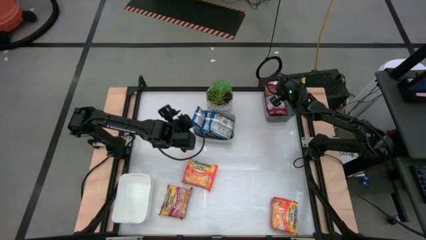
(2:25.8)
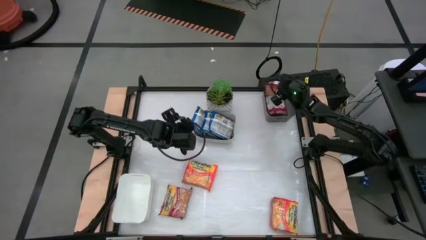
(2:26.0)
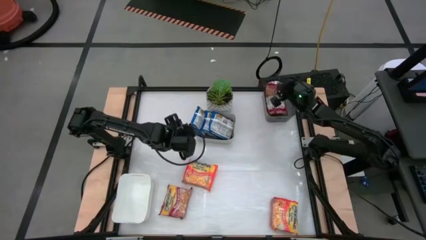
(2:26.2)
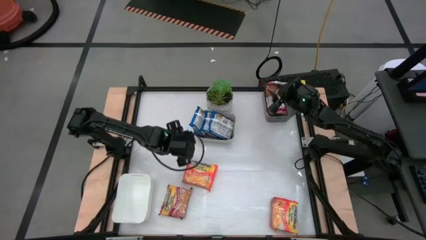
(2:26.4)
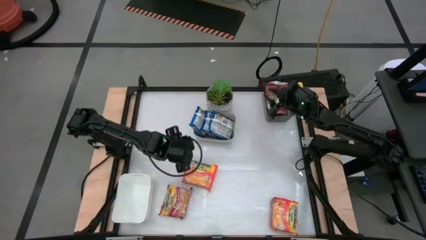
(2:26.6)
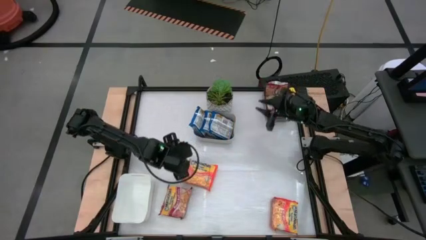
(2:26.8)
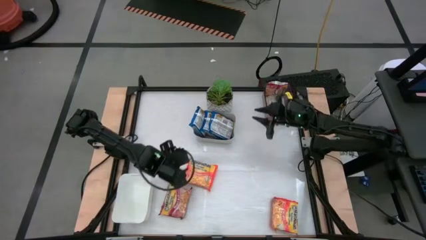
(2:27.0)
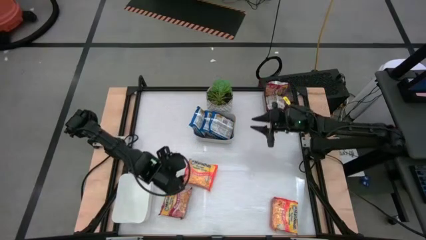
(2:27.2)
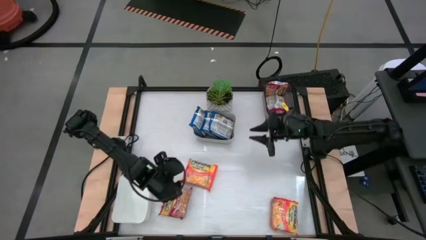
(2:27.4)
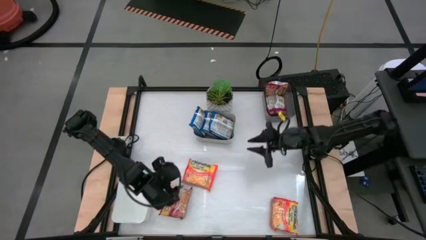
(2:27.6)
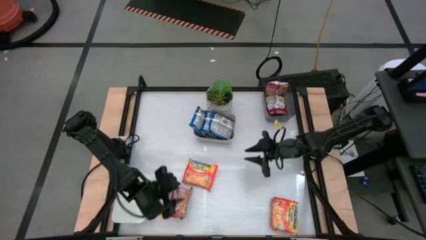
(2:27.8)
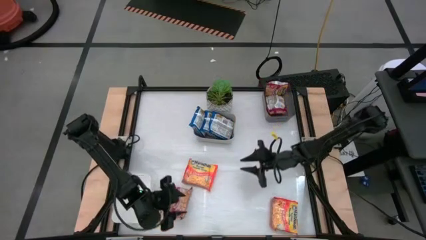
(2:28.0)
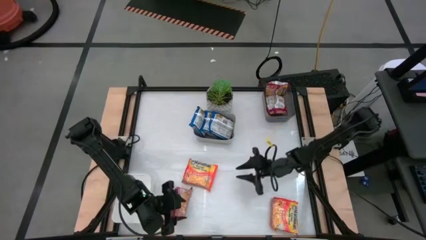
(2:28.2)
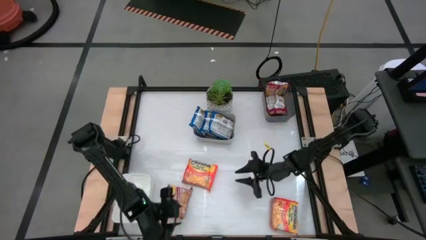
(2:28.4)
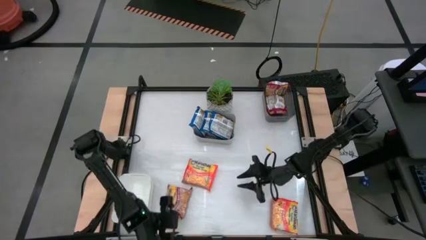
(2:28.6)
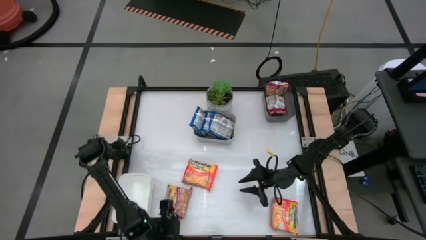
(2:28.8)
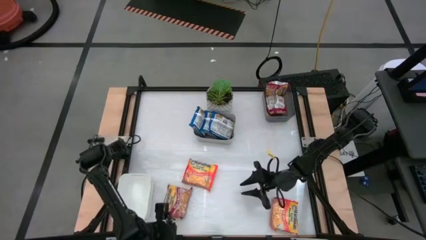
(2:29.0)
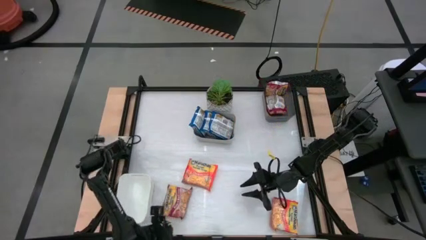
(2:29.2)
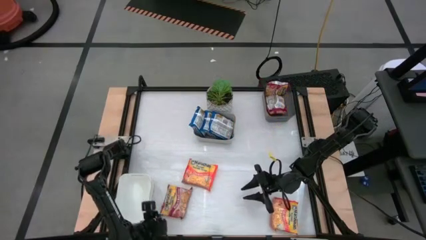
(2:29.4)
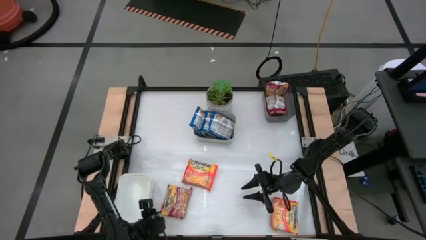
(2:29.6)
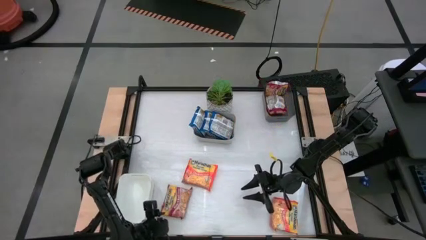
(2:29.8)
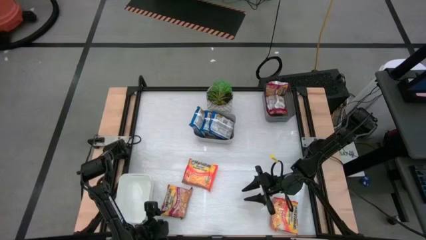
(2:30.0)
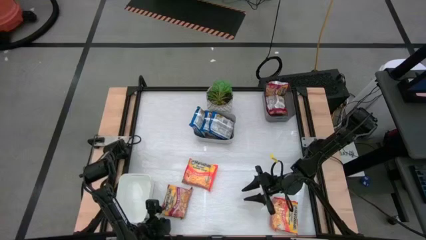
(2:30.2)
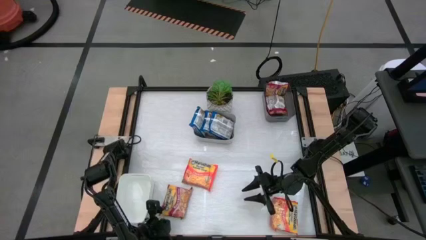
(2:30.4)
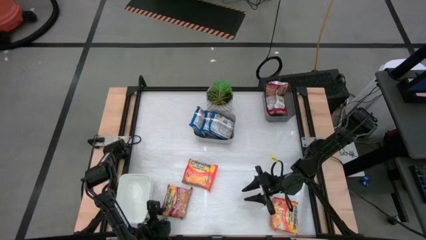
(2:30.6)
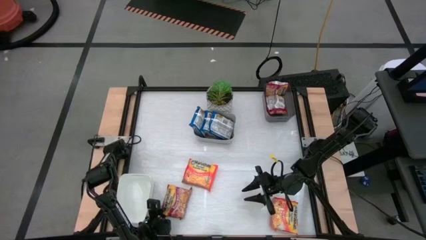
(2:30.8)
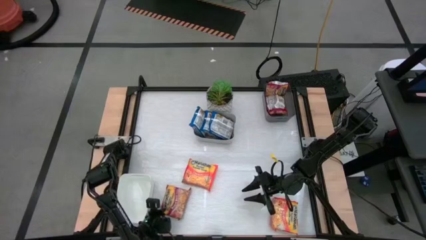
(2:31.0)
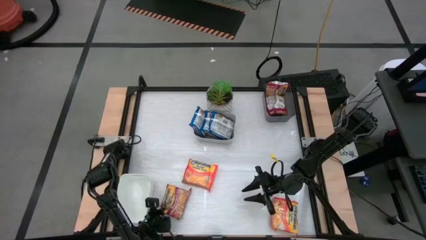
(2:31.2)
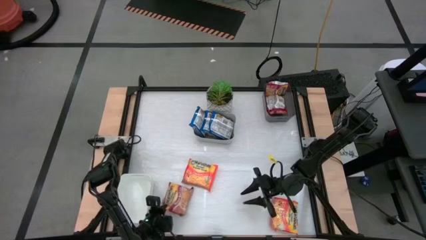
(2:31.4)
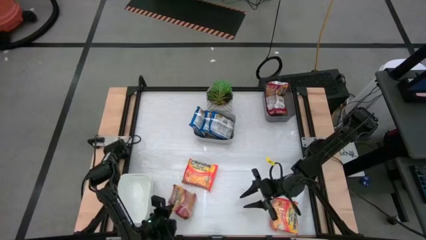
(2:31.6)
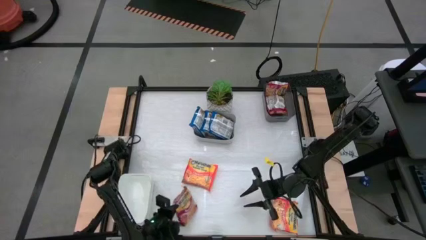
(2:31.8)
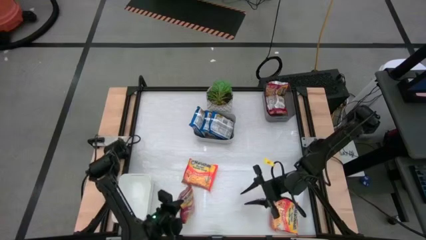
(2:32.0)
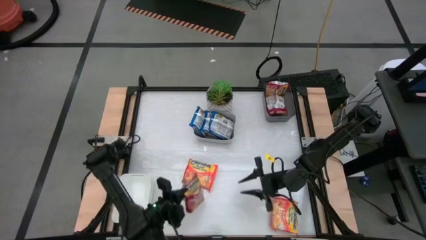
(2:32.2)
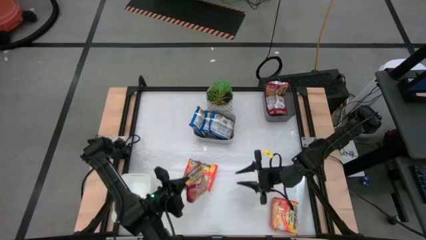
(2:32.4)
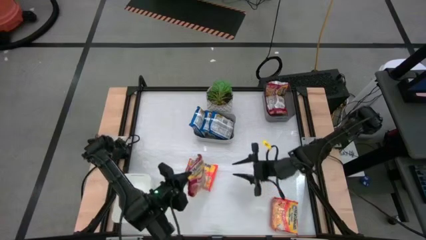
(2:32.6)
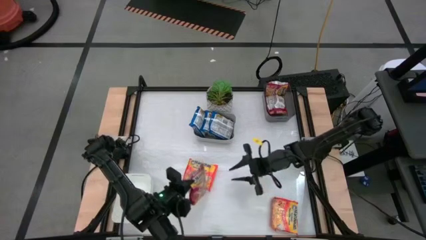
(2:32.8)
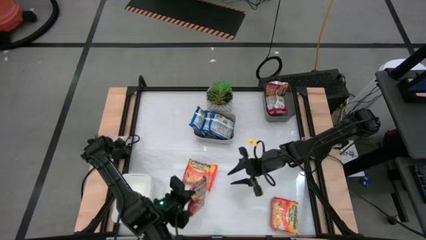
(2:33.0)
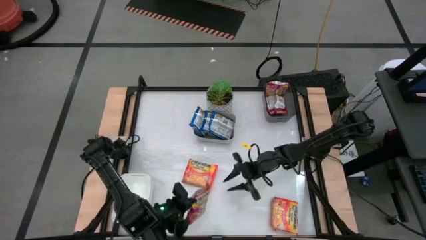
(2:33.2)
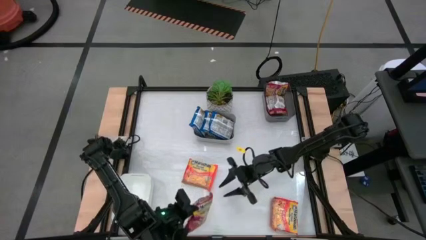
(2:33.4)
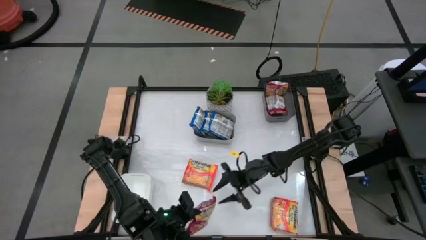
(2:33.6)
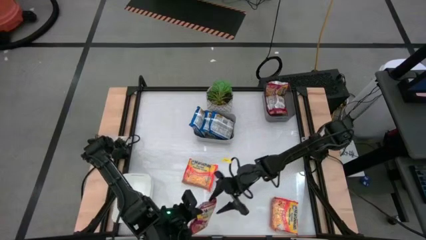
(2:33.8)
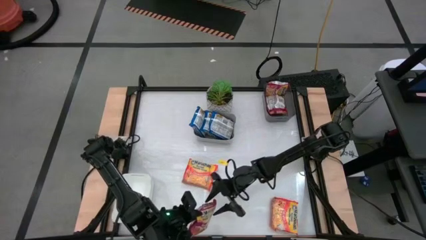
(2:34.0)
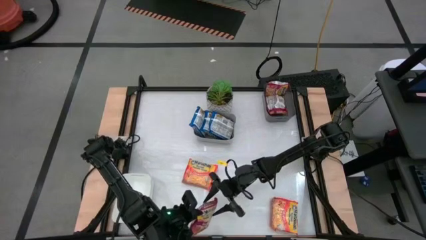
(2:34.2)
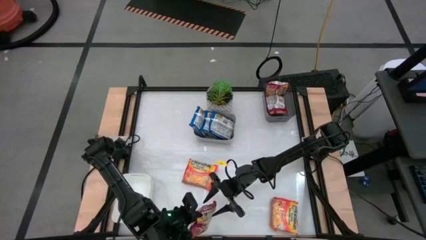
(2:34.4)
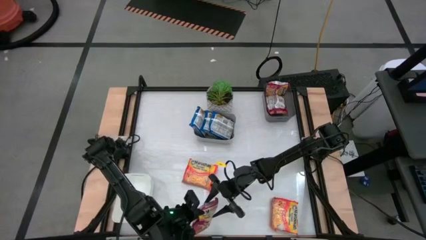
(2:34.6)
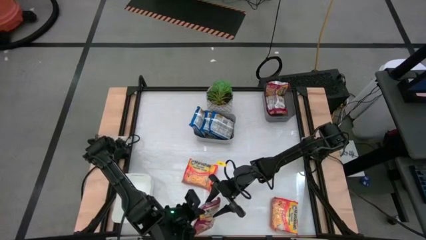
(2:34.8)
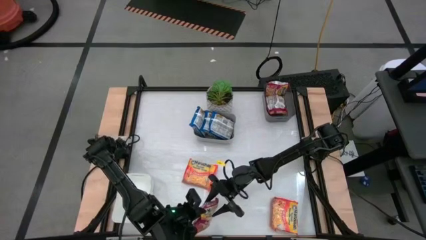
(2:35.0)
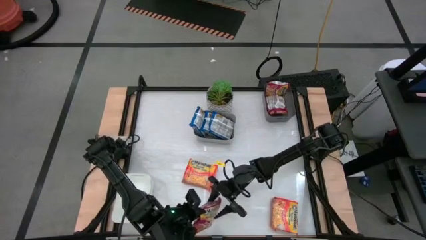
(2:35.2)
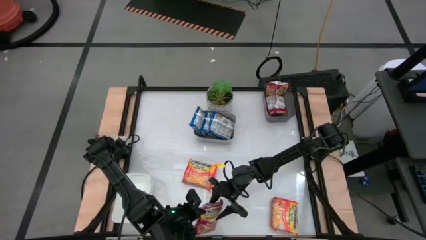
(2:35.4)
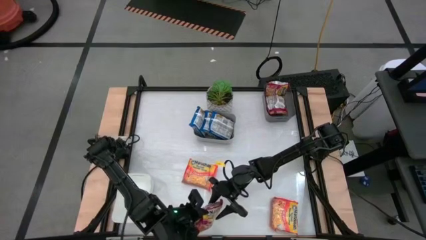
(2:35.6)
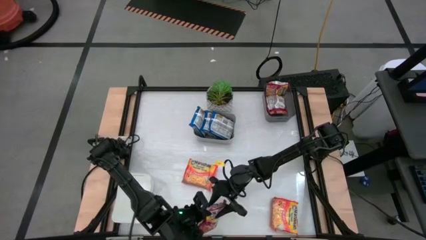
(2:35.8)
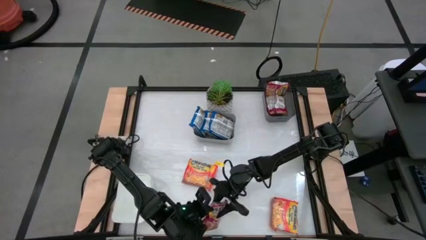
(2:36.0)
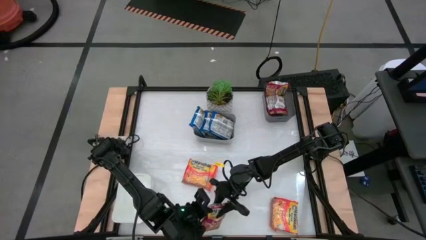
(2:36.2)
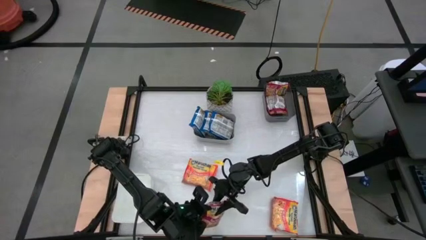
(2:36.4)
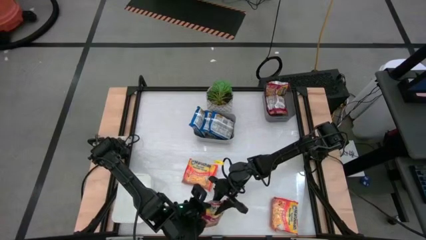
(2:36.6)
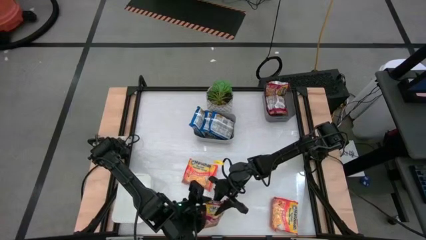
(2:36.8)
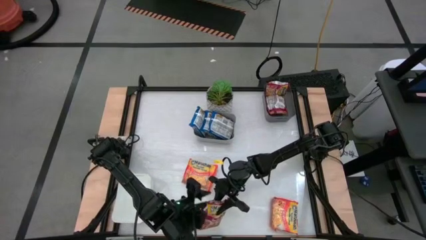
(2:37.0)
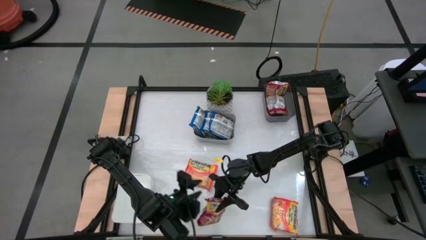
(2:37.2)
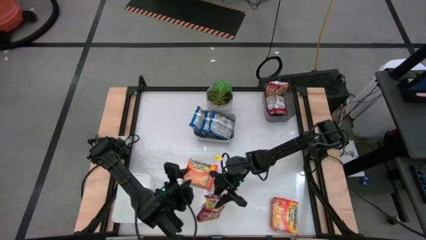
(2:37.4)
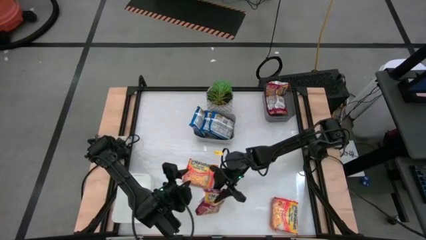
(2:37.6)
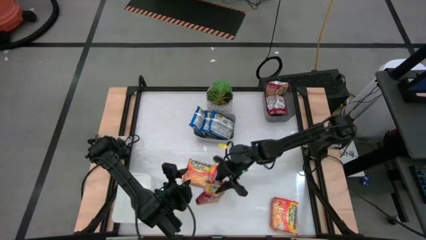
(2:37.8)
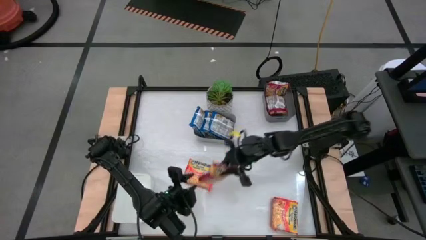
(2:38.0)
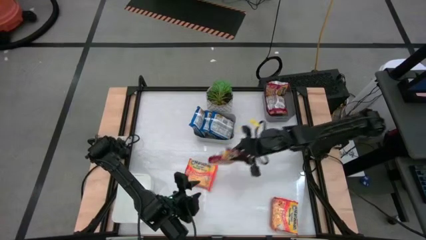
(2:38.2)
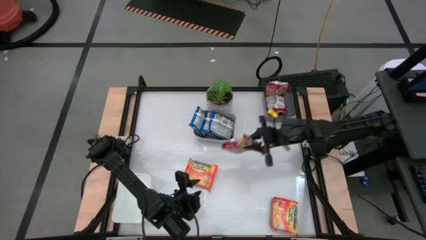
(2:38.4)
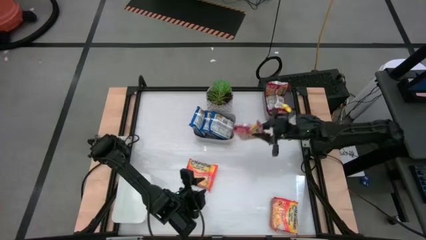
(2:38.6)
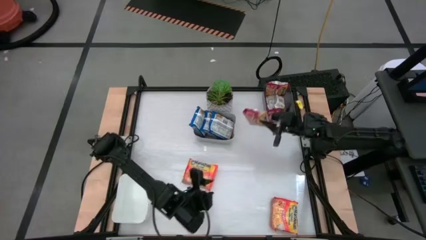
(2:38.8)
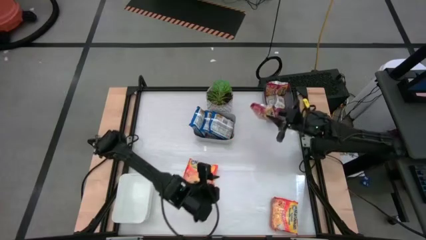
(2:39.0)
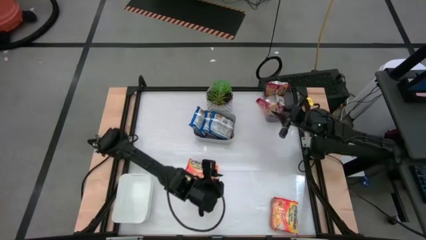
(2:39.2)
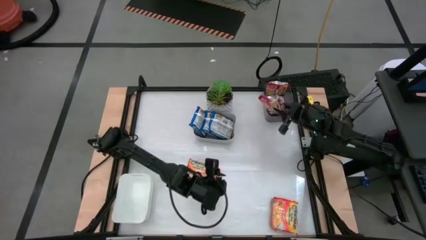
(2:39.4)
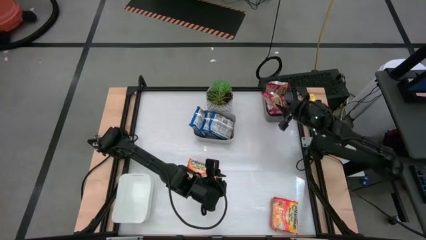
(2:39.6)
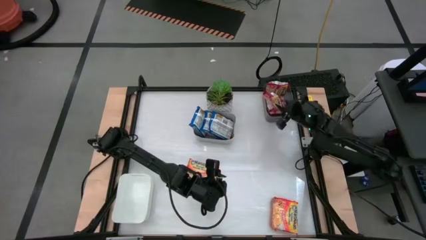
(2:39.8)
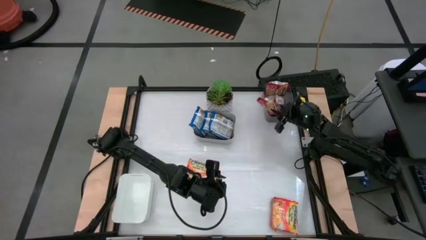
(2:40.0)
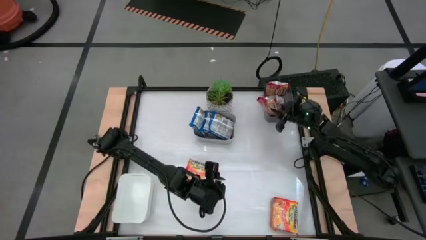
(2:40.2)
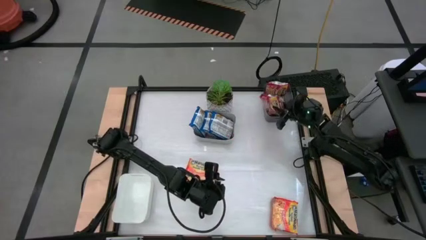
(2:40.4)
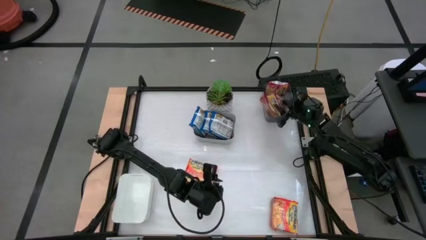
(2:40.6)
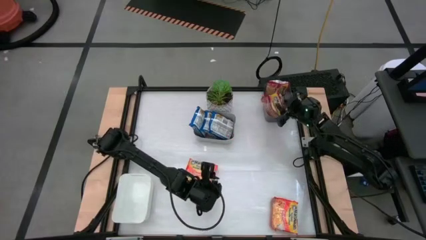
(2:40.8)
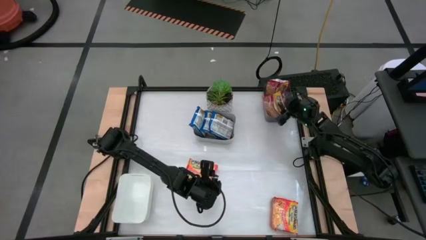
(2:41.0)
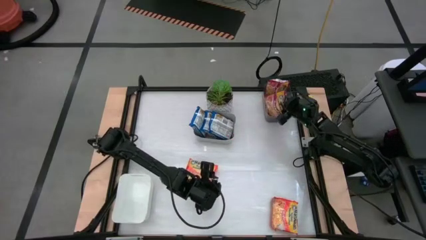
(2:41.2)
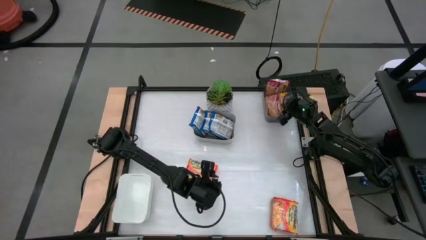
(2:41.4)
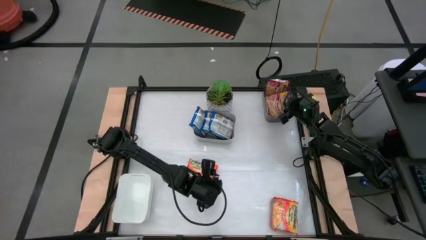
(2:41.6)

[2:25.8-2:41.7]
Task: Sort Maruchan noodles
Put the red noodle pack into the black bin

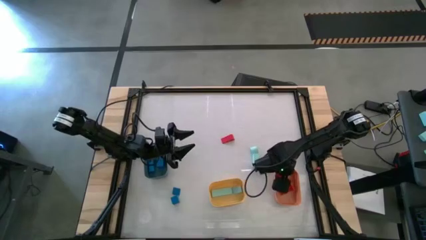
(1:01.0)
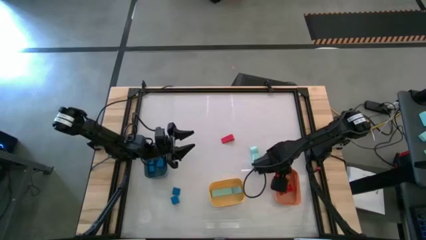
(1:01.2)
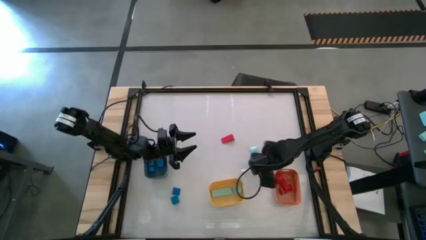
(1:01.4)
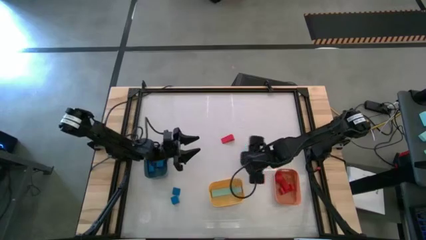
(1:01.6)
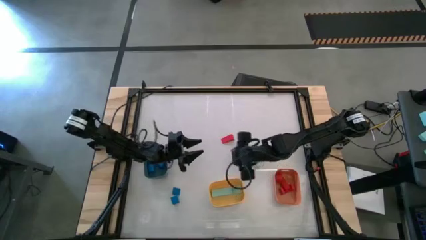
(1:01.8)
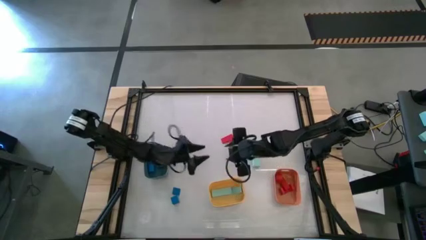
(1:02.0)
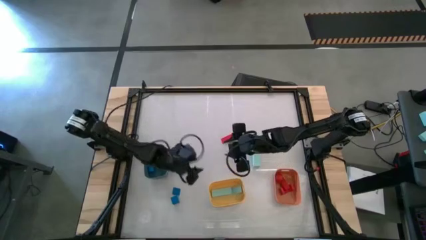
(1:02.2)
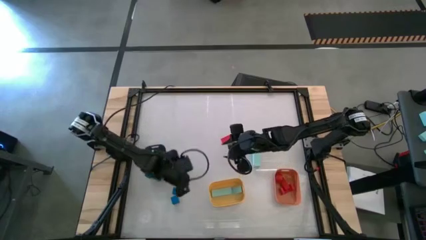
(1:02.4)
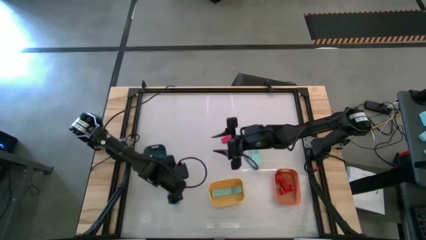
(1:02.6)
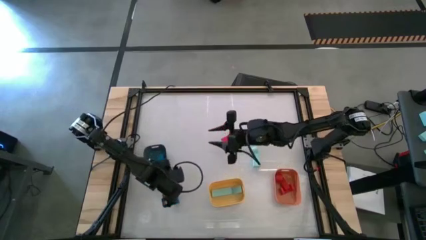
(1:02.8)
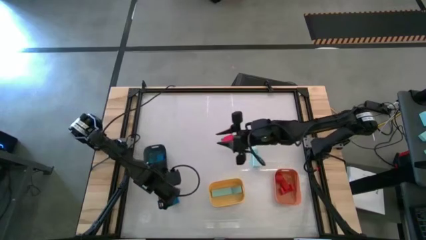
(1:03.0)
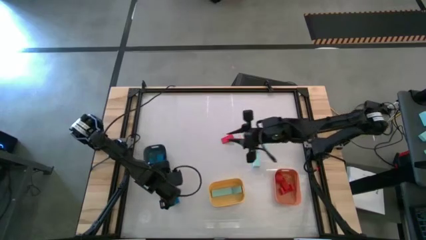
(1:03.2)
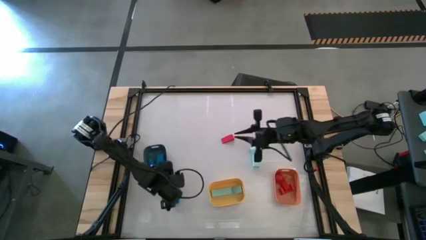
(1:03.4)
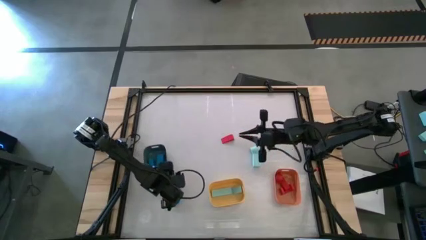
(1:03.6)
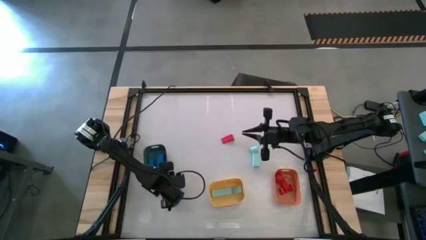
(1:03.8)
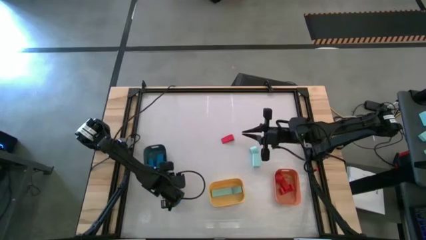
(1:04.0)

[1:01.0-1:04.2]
Task: Sort & place blocks by color
Put the blue block into the blue bin
